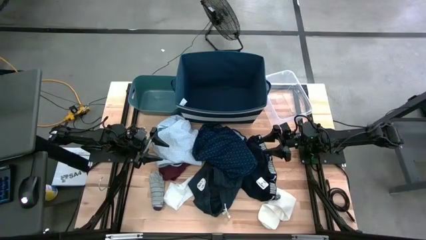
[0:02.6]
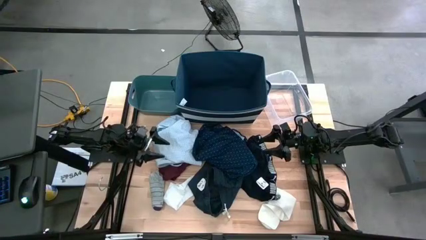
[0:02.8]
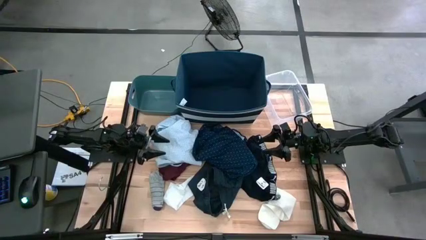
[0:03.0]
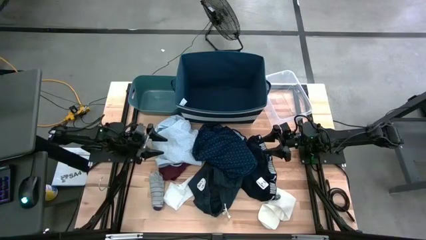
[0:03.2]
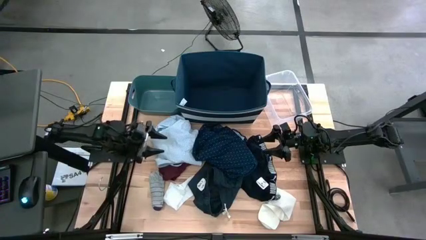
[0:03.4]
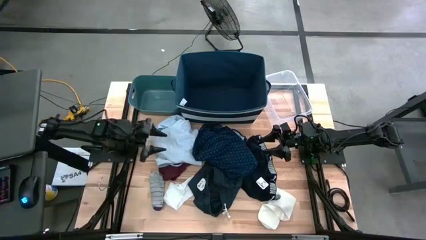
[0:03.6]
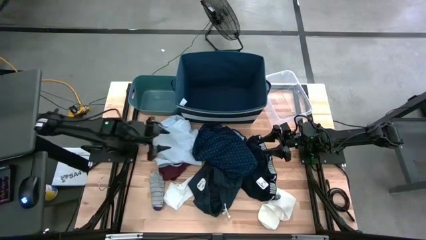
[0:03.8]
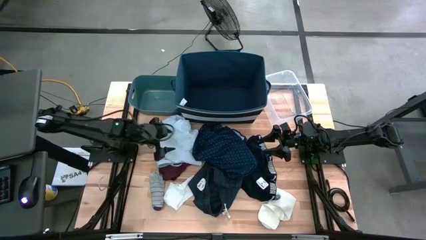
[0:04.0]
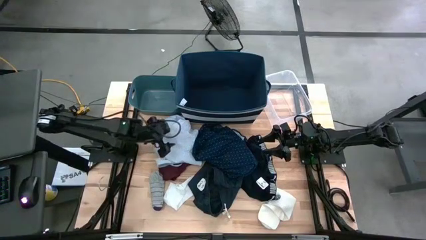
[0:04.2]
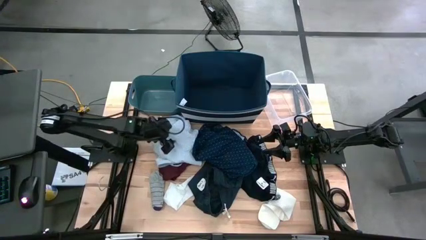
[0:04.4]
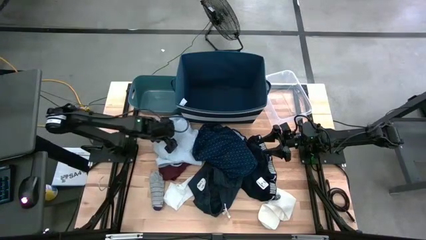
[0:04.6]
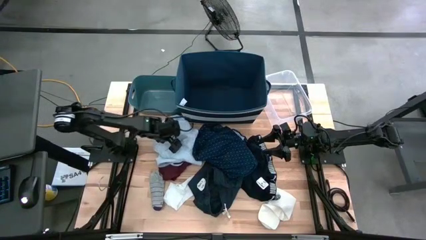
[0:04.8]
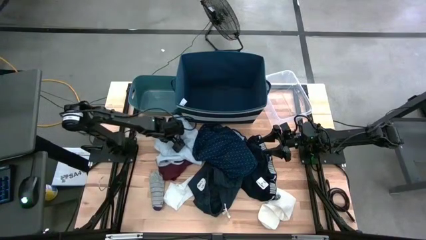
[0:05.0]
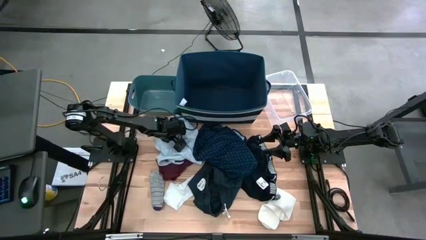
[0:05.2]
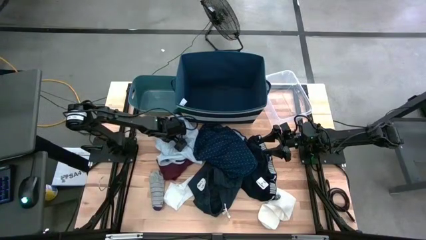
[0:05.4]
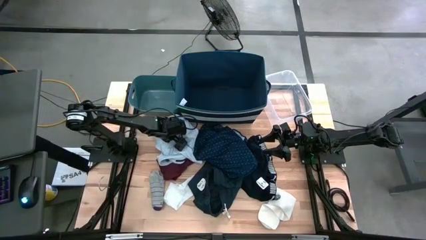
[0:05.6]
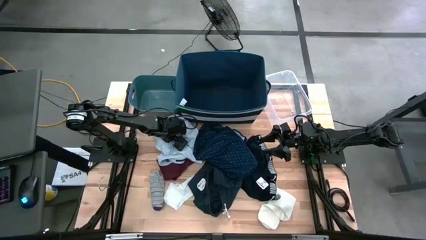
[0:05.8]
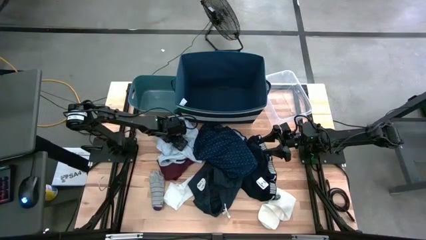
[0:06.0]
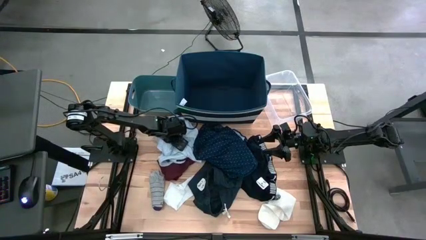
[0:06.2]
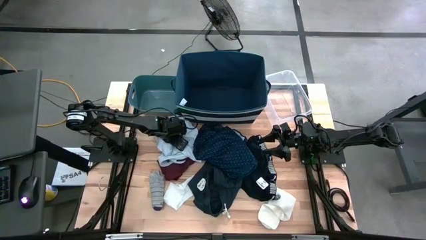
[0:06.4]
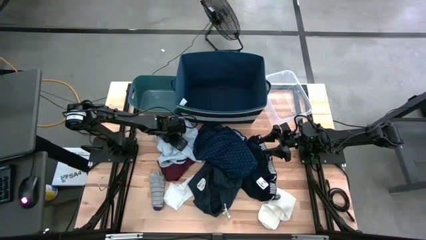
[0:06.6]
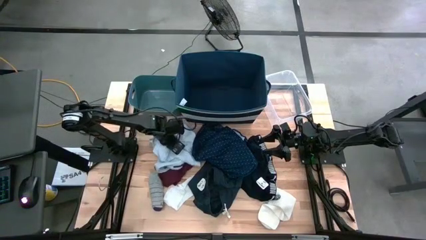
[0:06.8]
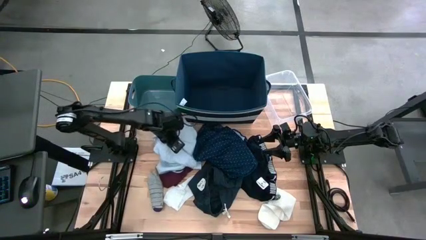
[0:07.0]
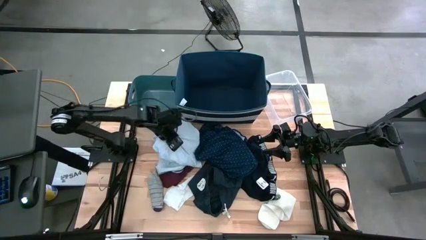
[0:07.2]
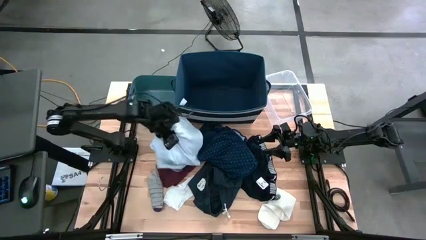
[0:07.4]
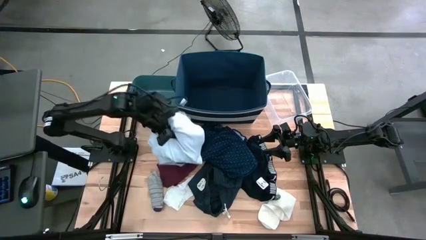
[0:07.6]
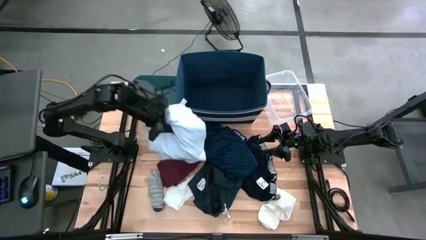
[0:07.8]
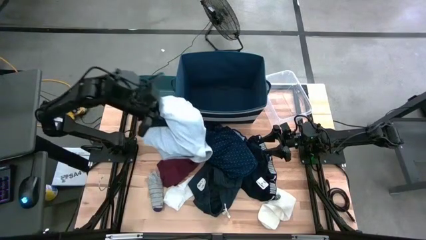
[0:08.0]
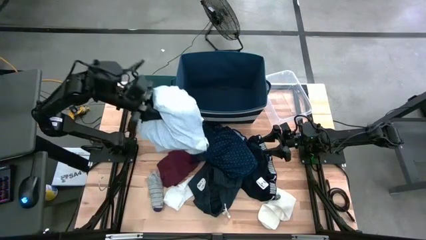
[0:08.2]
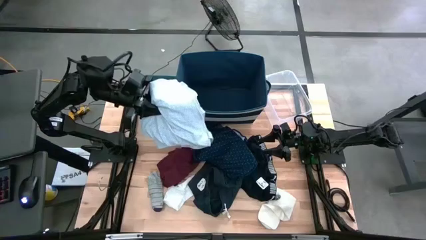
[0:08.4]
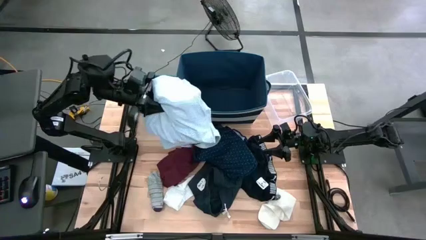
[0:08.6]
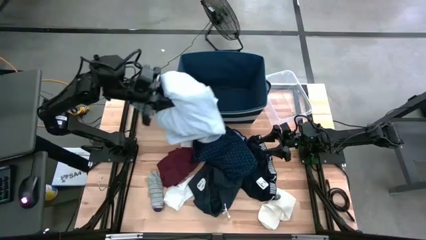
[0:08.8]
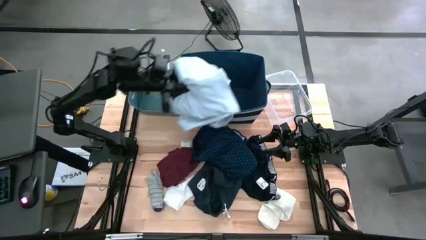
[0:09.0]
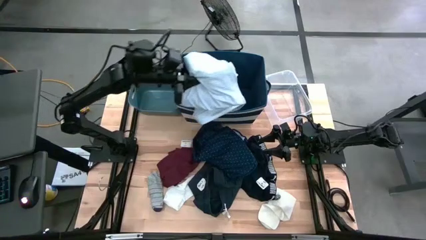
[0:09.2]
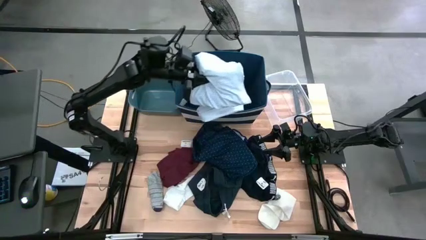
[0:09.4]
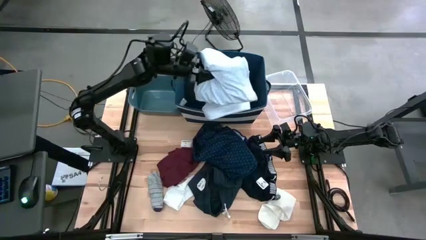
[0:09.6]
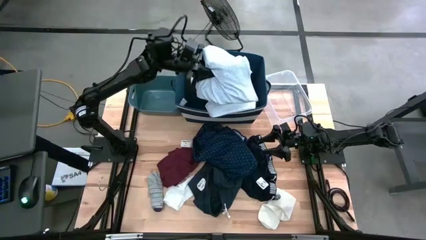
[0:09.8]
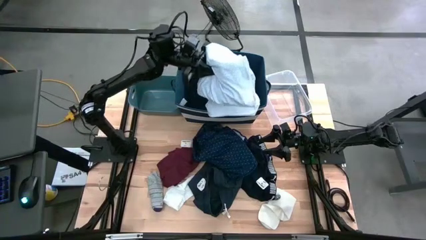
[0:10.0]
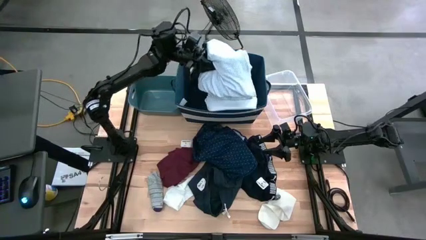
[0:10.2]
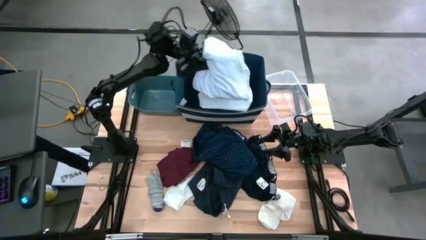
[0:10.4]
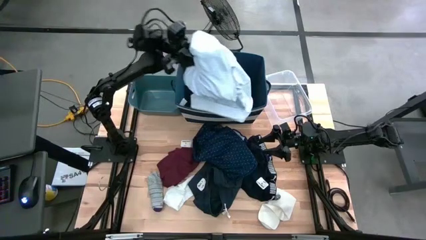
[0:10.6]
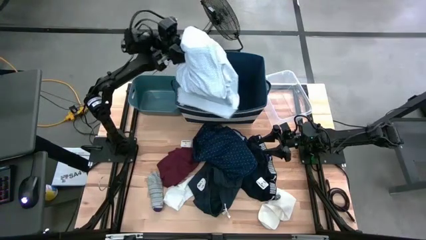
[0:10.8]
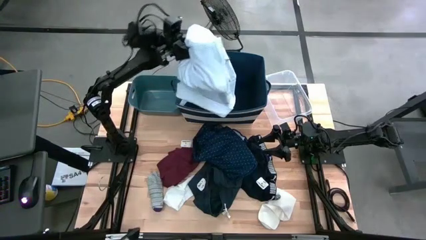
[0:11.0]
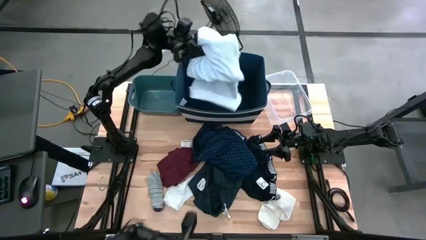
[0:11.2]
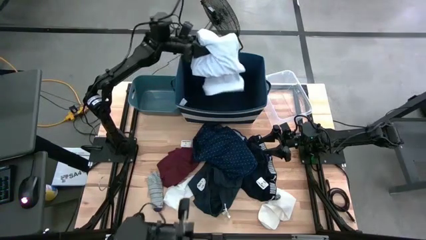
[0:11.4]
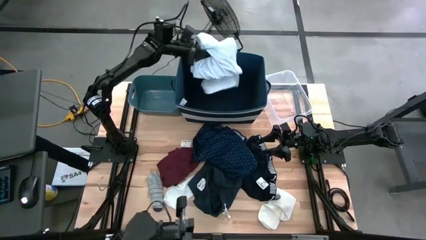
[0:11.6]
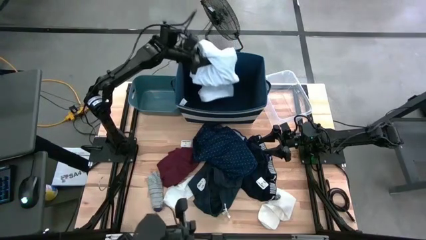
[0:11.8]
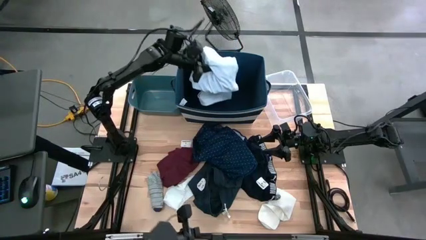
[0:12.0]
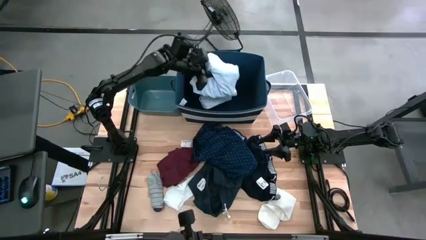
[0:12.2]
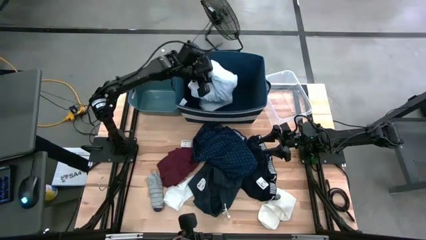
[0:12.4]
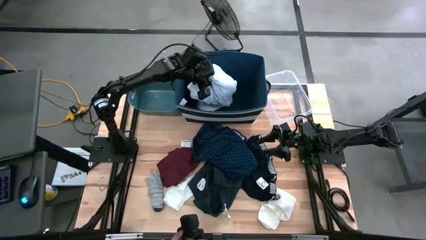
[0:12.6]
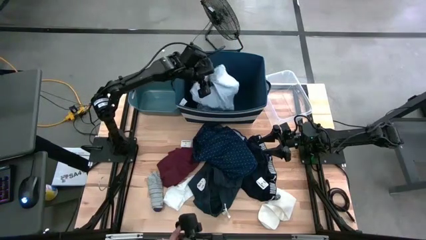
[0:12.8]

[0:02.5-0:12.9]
Task: Pick & Place Cloths
Put the white patterned shirt into the blue bin
